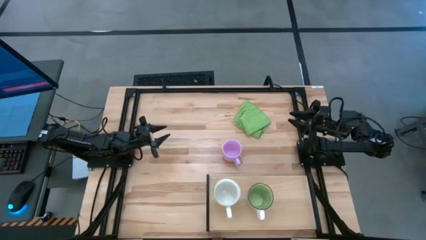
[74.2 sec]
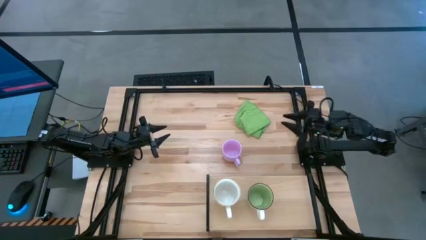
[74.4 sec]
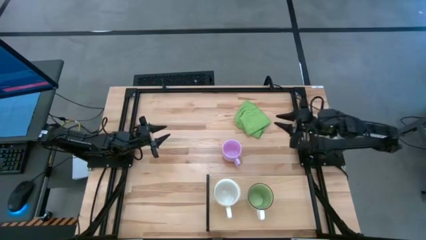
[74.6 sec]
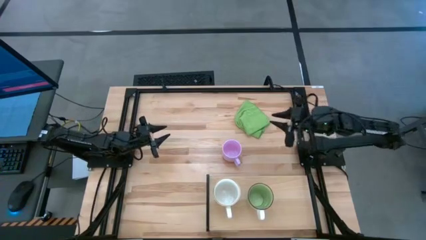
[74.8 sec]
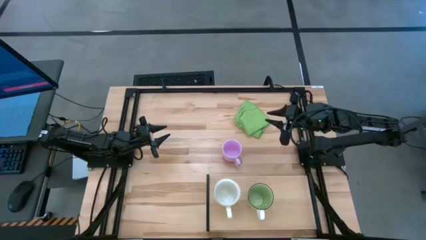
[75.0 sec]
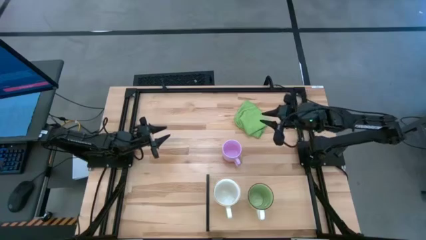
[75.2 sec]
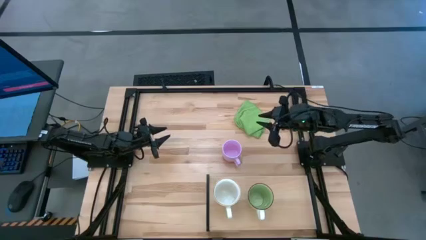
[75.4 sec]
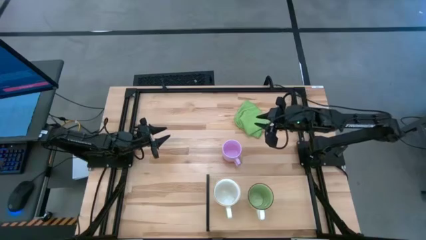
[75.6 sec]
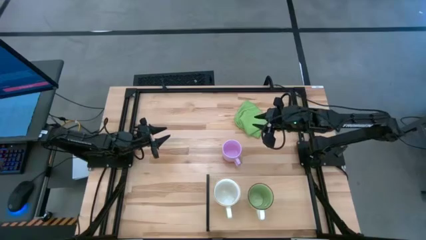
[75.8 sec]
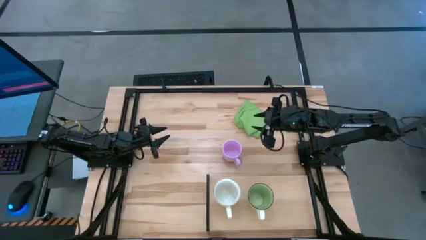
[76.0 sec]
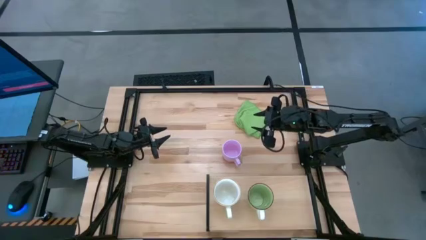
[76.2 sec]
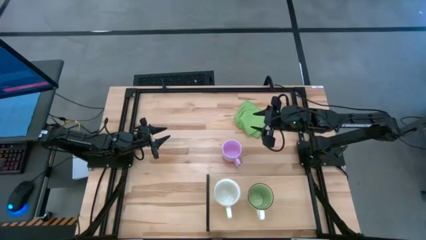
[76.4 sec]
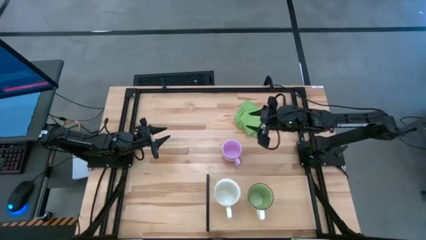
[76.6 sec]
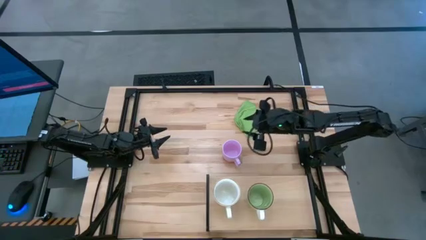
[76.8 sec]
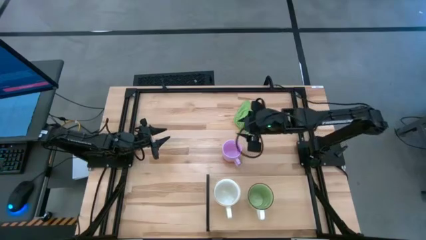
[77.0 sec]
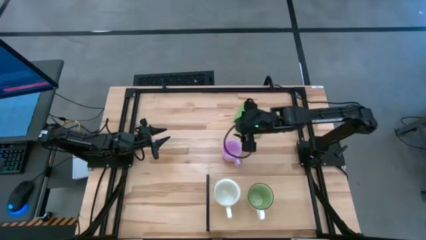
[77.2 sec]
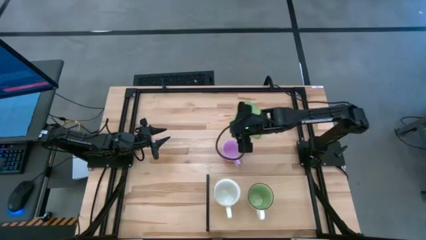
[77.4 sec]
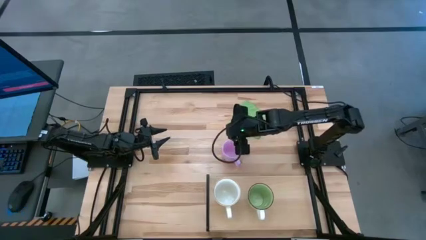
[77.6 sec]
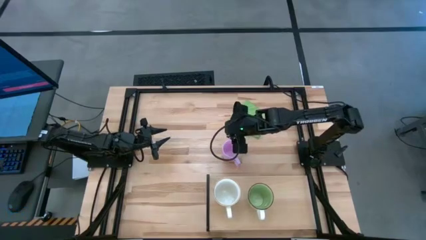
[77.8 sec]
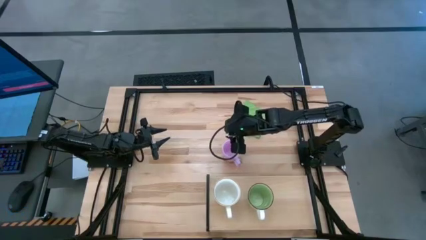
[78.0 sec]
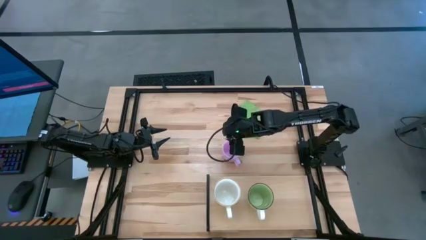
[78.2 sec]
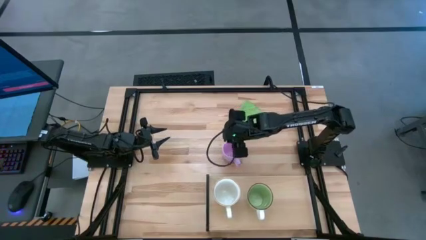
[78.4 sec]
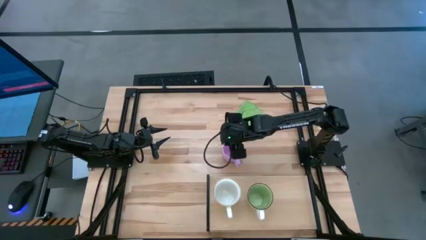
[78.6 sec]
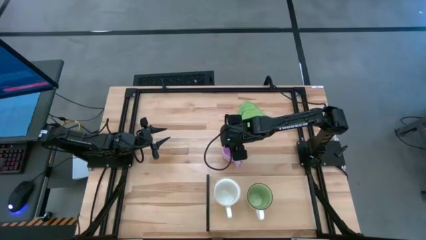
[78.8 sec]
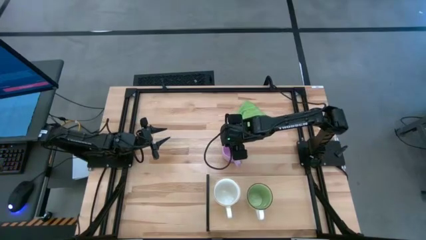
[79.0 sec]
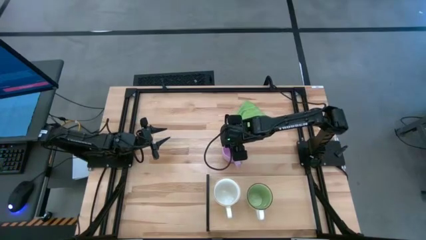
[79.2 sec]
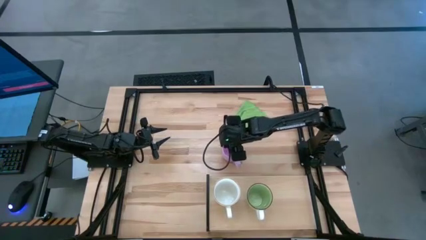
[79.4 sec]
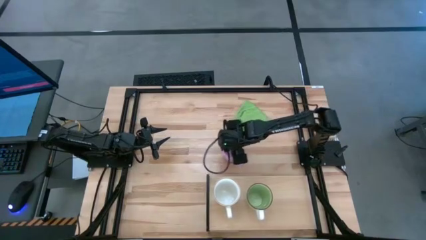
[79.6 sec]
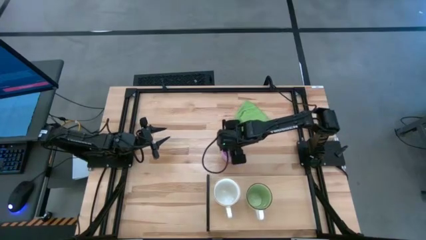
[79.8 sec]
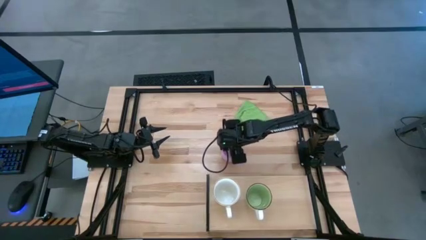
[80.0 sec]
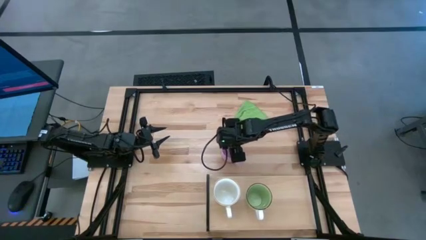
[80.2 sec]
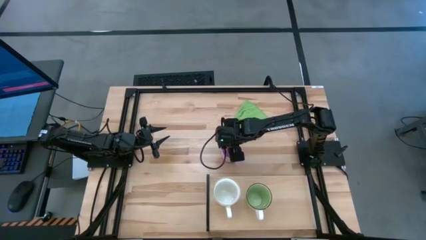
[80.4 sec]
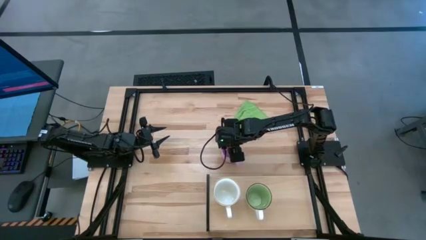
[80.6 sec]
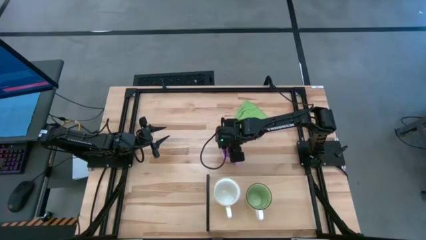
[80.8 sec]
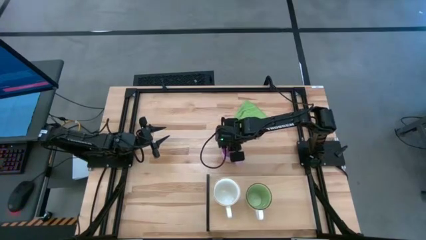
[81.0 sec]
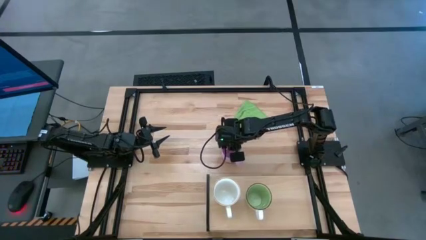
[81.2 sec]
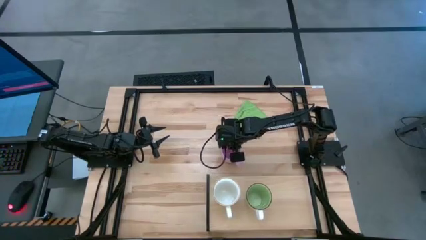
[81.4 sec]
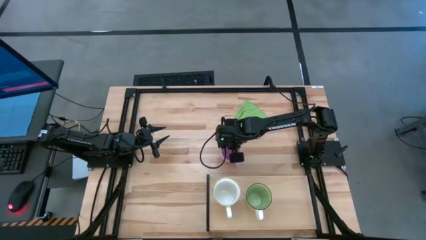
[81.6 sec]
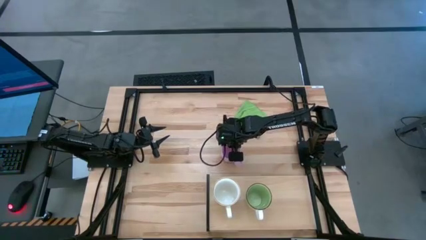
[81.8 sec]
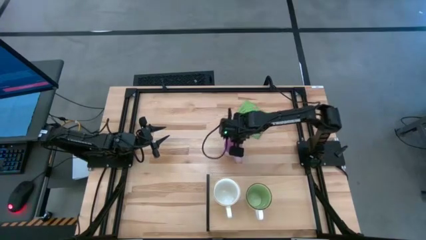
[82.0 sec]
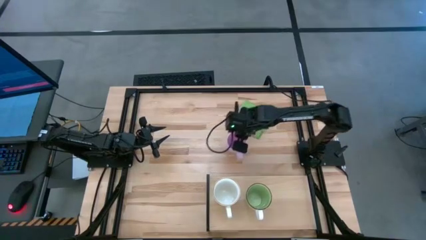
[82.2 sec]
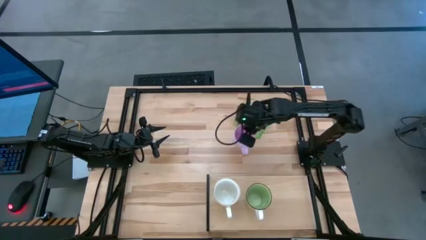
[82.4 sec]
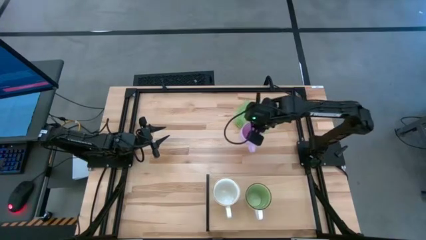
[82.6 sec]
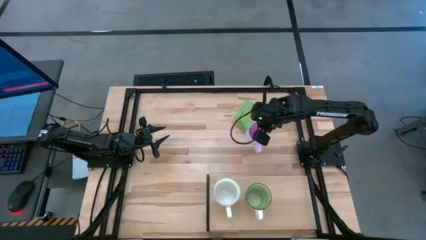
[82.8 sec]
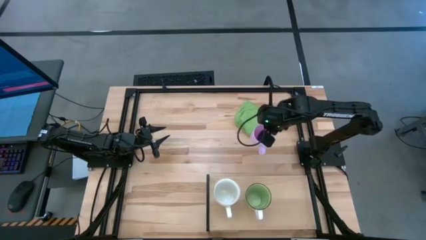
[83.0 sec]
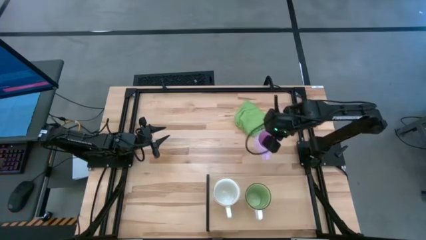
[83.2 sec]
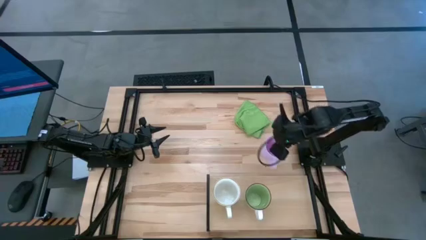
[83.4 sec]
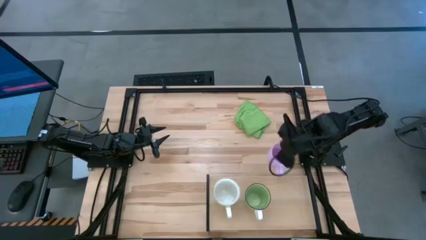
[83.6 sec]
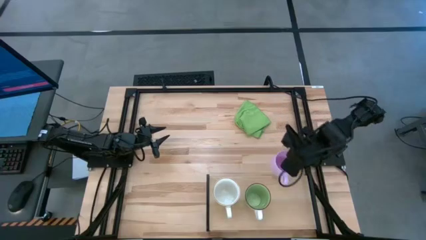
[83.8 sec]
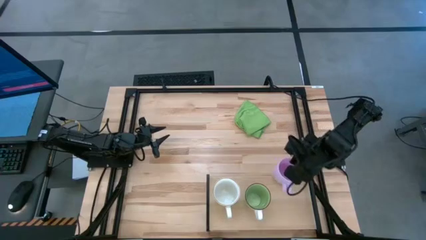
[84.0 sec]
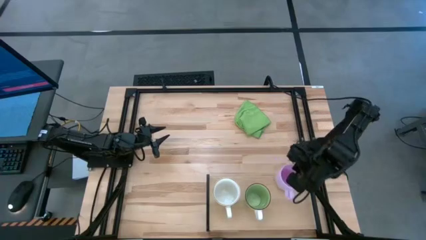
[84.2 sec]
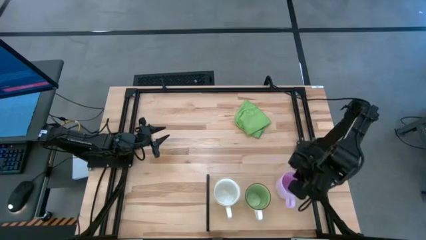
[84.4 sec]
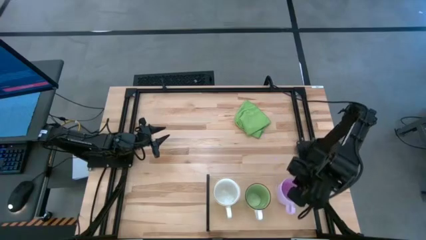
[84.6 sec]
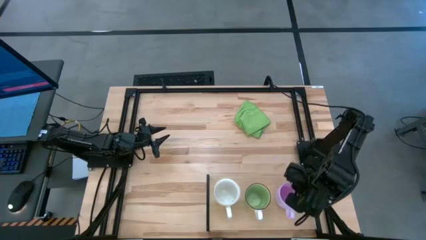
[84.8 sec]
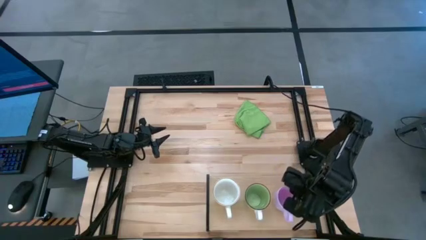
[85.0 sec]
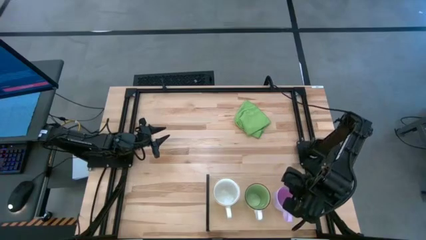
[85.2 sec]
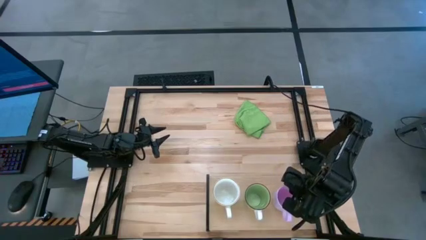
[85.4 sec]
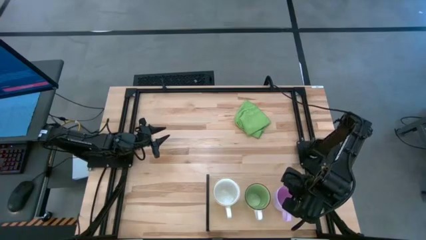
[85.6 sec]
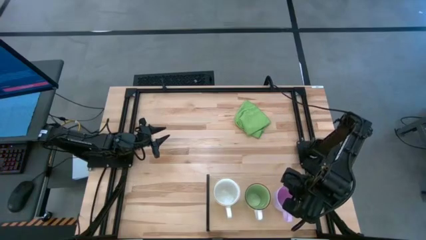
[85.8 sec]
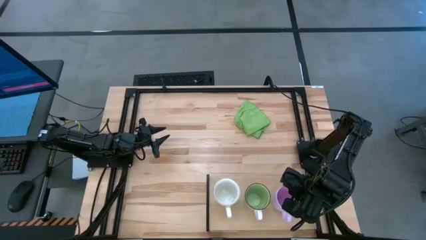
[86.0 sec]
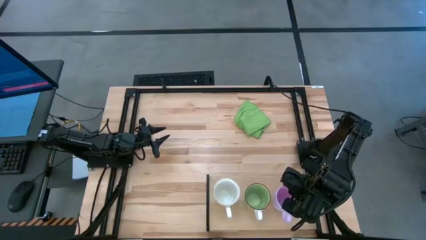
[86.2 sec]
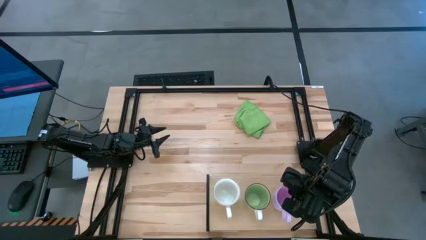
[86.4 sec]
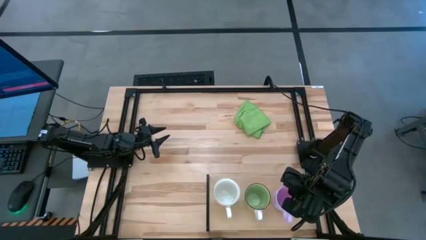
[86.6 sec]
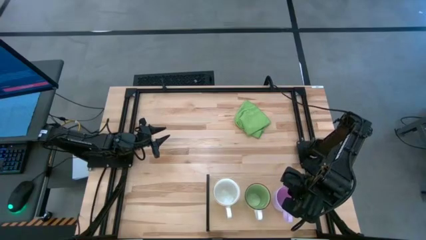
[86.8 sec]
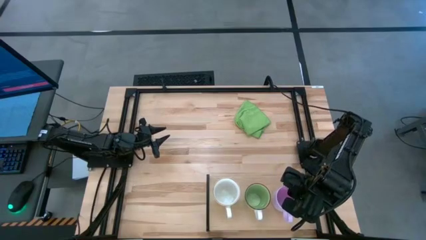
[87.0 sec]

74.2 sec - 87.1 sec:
Task: Stack small to large cups/mugs on shelf
Put the pink mug on the shelf

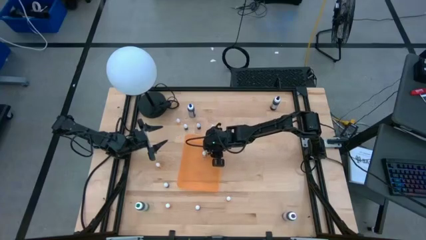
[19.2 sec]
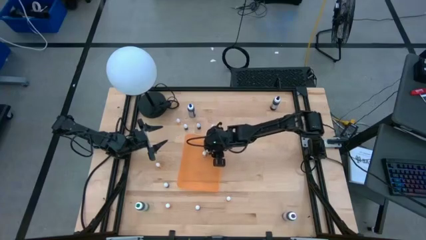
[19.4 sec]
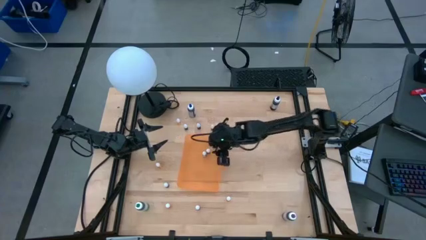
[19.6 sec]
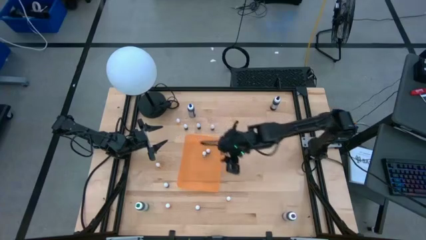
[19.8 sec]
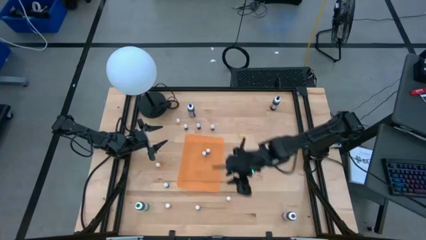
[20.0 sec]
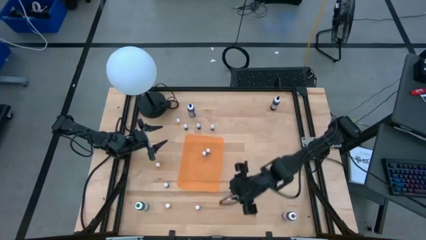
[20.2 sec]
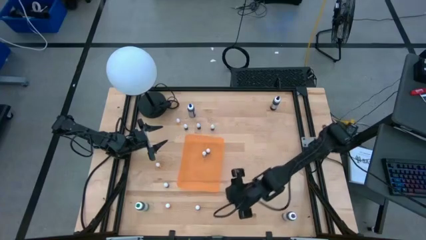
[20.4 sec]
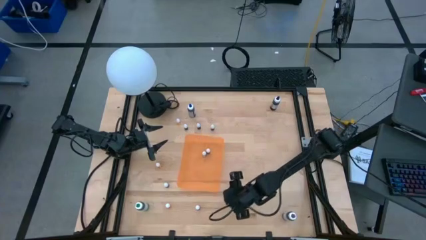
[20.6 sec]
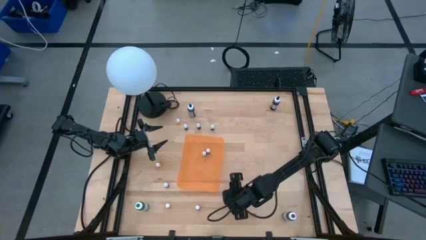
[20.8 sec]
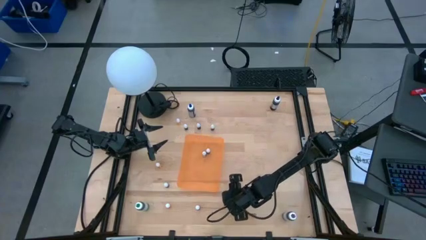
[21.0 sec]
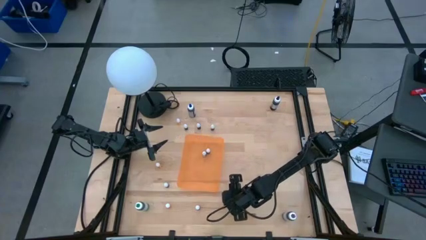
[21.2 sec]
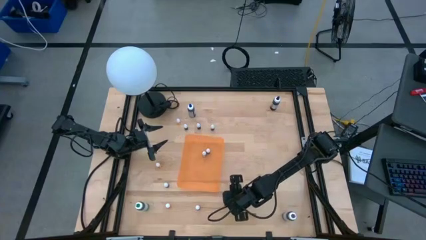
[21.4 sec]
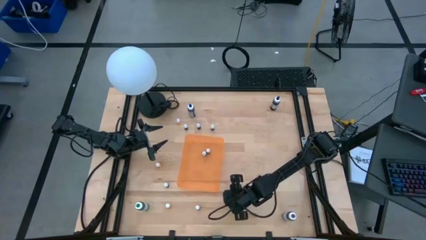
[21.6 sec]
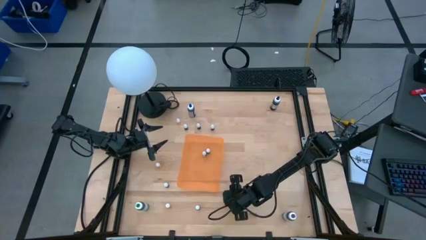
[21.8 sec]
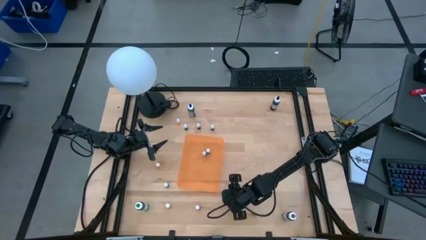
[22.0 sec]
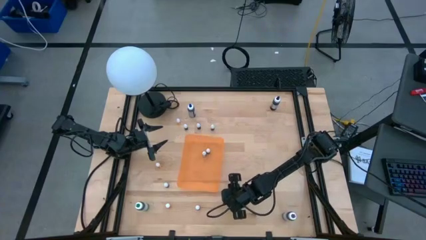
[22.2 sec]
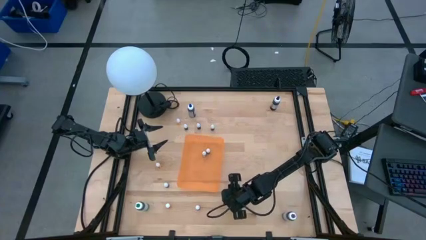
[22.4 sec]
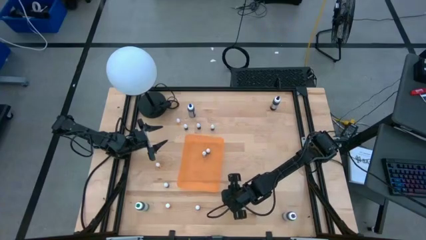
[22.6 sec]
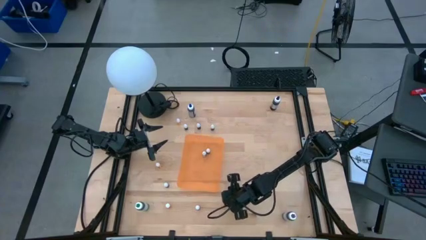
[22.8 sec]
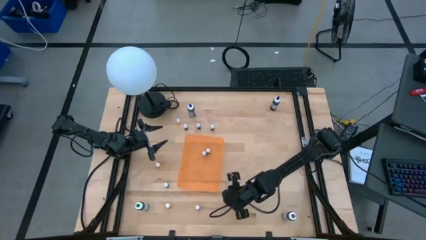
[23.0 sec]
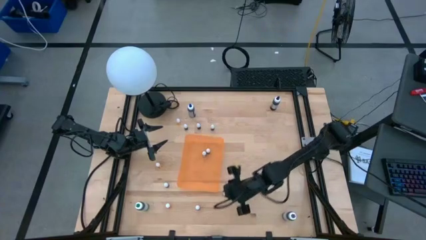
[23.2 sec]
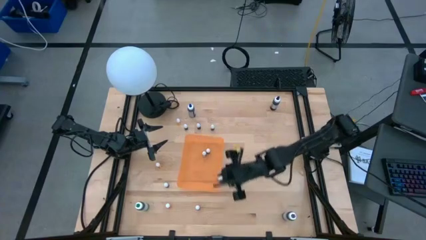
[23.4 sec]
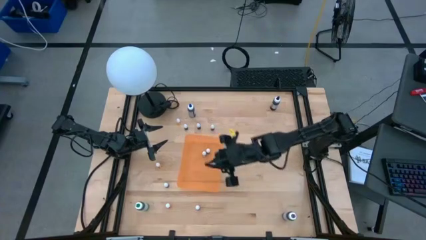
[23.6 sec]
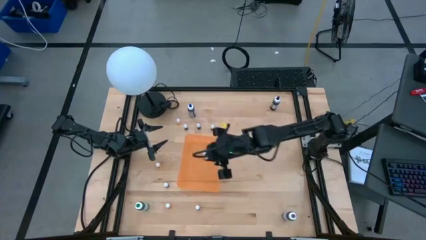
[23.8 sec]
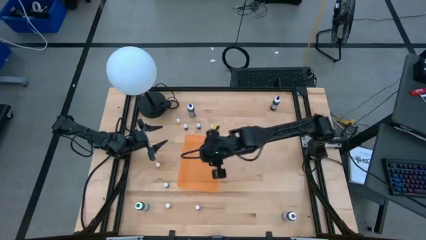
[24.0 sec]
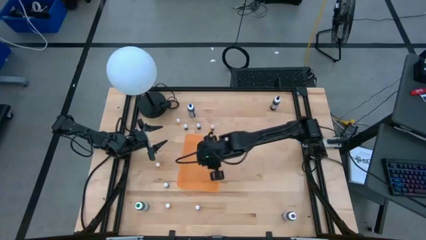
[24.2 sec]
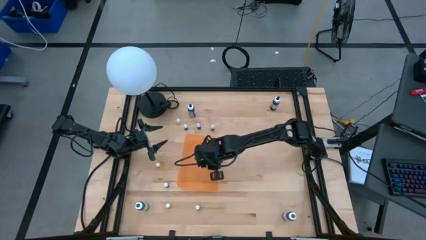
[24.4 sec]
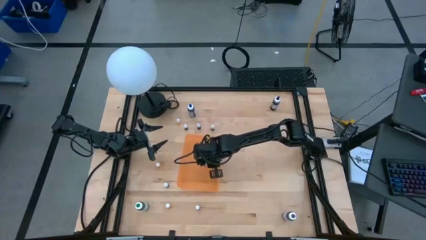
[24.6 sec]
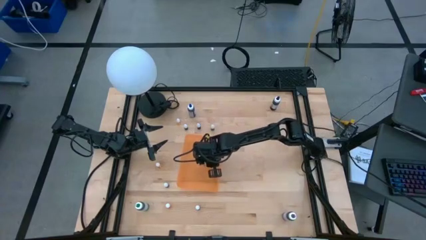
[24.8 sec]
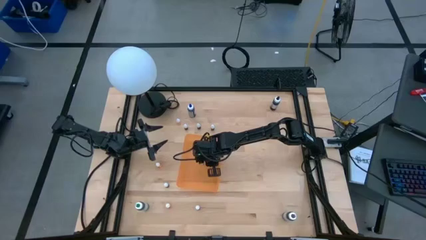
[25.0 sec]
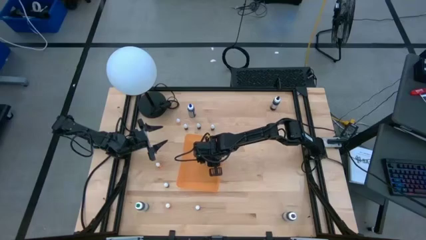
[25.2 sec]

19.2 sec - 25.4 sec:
Task: Pick & Place food coloring
Put the small orange food coloring bottle into the orange bin
